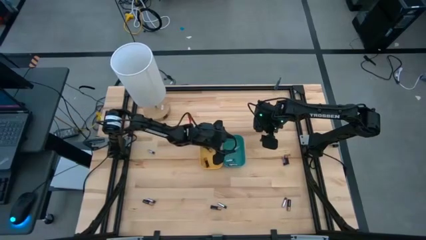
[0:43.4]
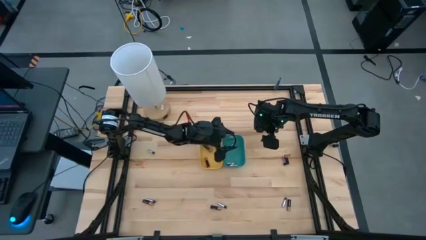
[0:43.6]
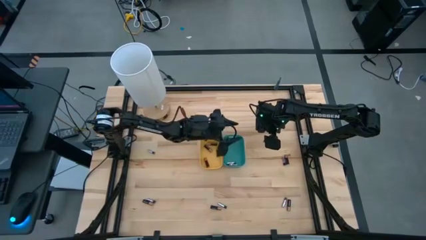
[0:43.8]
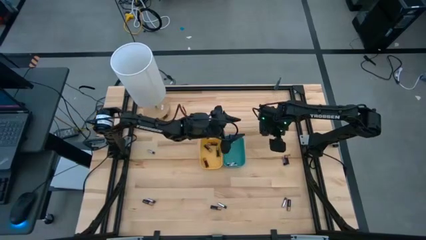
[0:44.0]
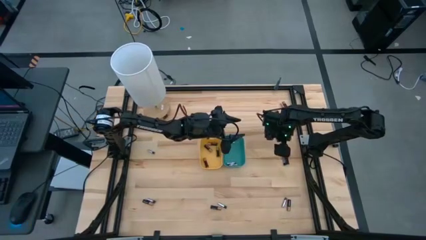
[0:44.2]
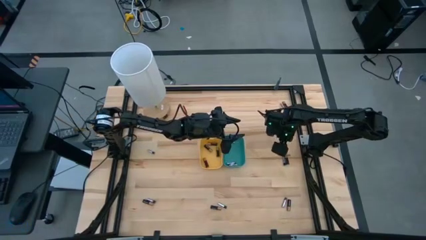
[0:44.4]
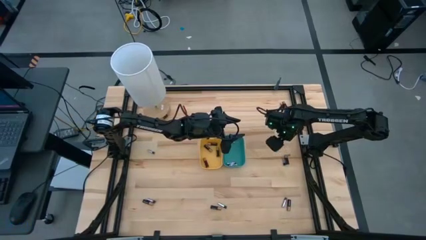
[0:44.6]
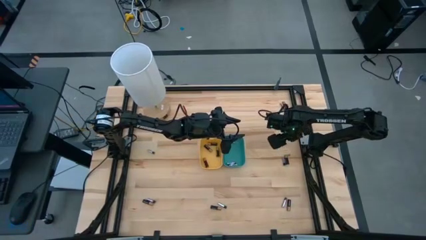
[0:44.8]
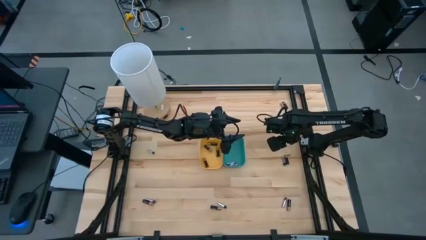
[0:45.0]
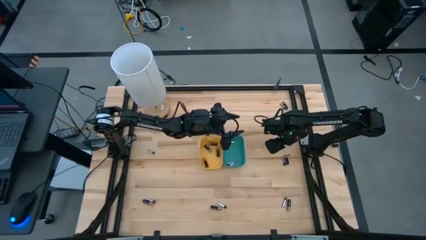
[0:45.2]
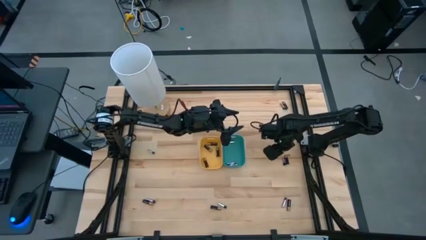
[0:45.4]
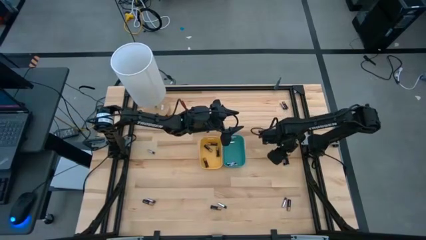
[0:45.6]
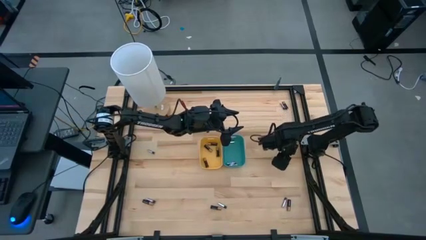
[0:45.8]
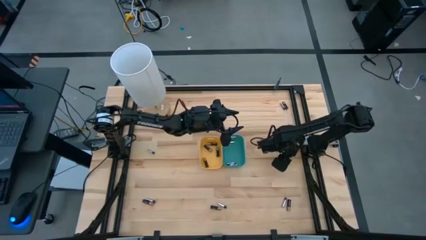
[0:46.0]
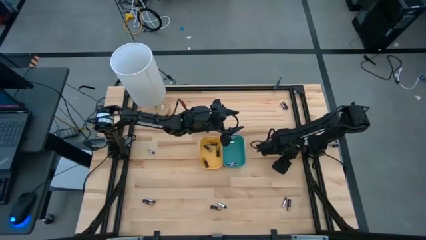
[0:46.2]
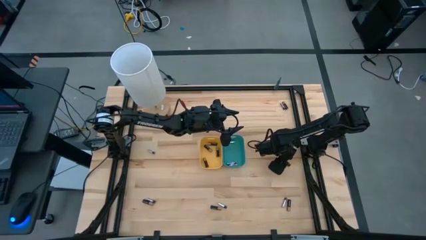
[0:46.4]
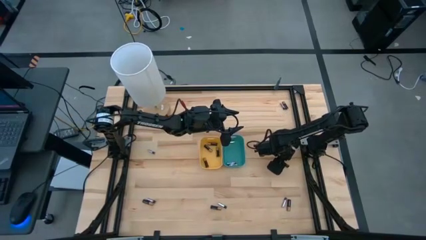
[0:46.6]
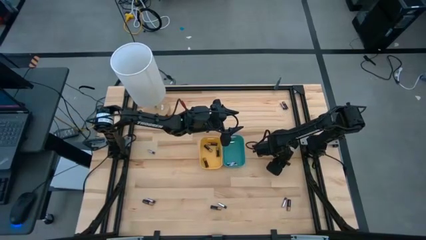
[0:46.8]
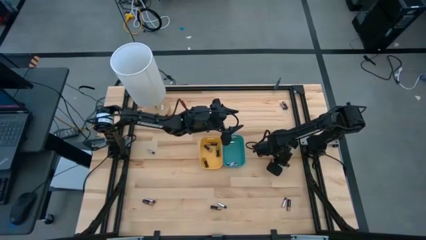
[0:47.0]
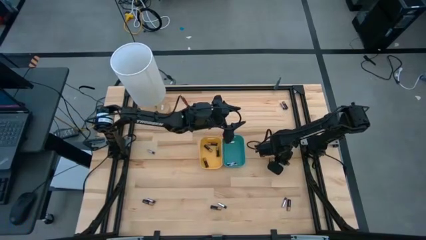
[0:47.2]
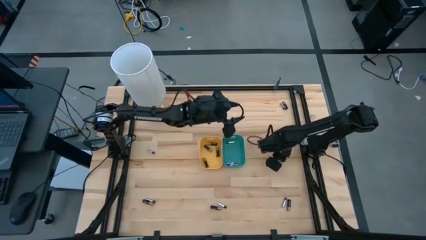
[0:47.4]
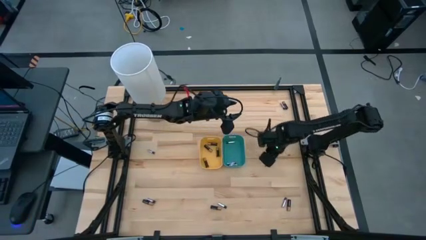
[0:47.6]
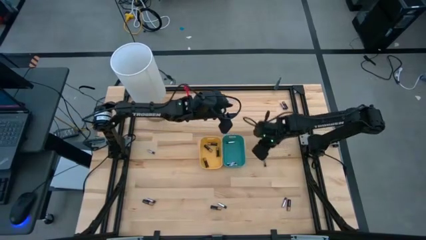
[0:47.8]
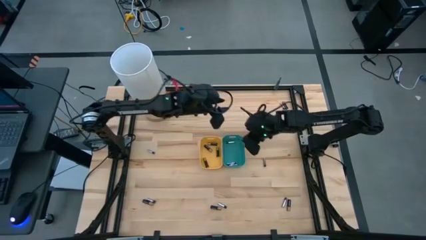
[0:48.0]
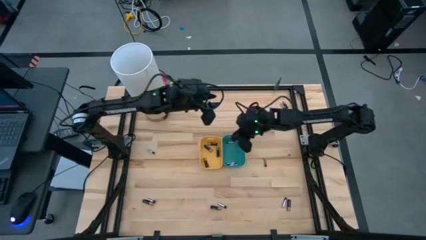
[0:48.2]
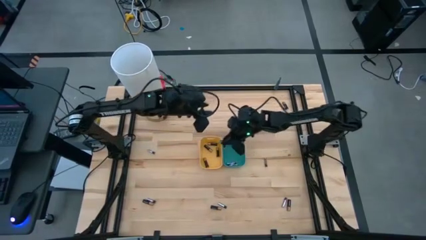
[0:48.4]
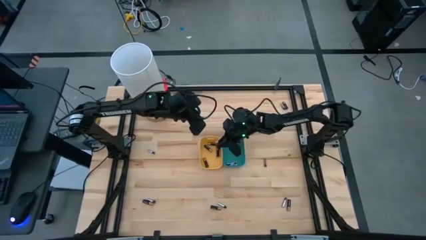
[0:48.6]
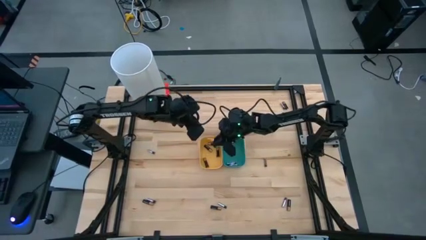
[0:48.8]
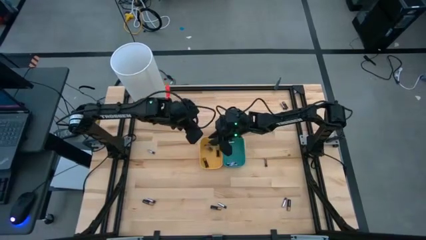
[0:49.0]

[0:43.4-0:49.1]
Task: Sort batteries
Put the black battery into the yellow bin

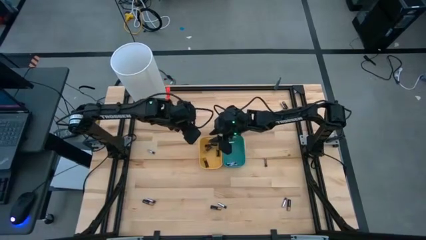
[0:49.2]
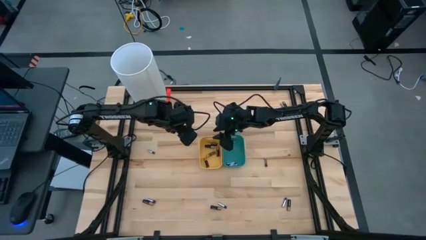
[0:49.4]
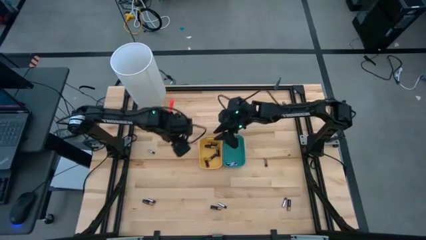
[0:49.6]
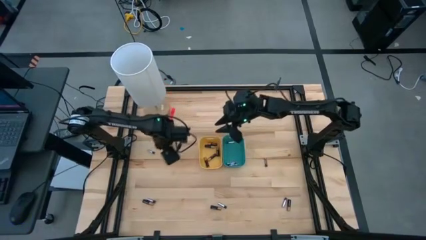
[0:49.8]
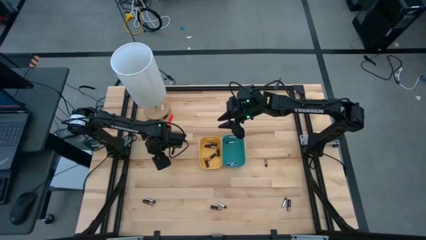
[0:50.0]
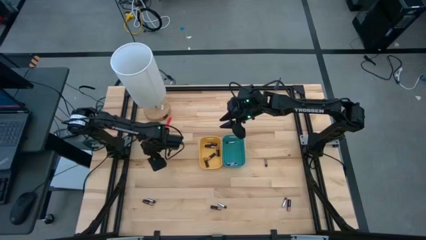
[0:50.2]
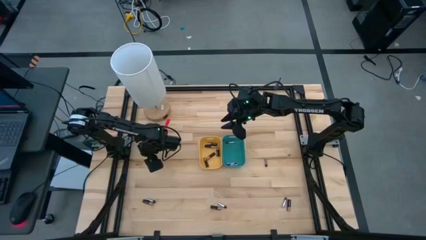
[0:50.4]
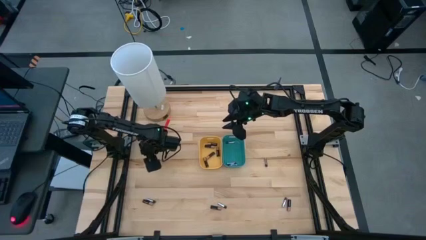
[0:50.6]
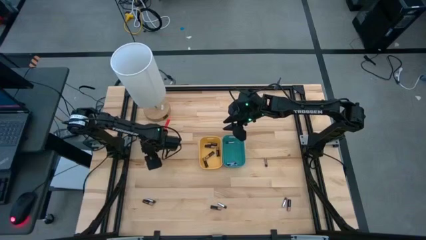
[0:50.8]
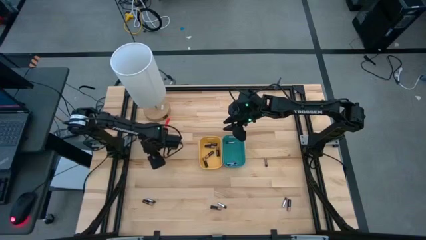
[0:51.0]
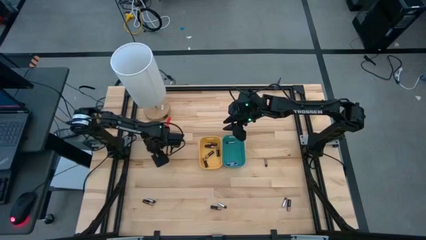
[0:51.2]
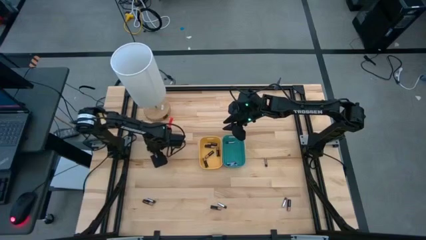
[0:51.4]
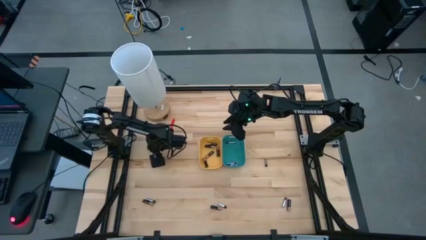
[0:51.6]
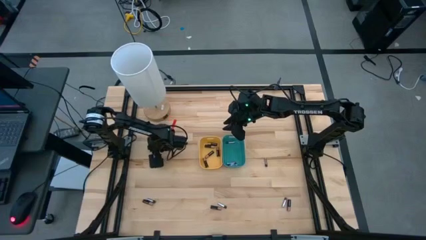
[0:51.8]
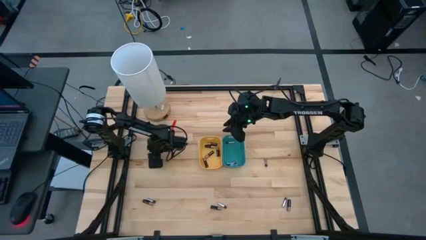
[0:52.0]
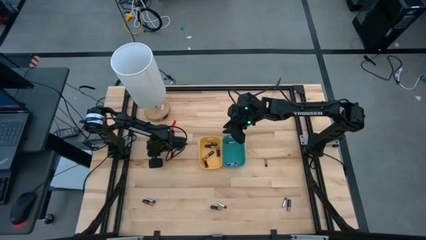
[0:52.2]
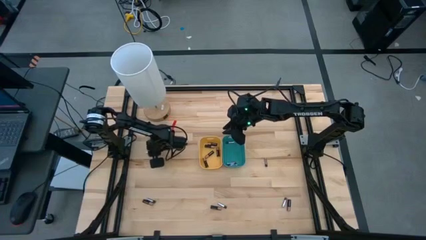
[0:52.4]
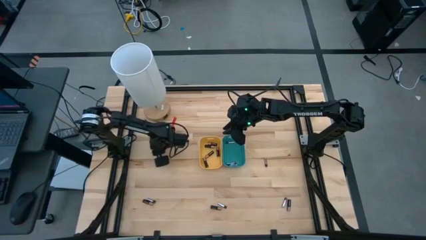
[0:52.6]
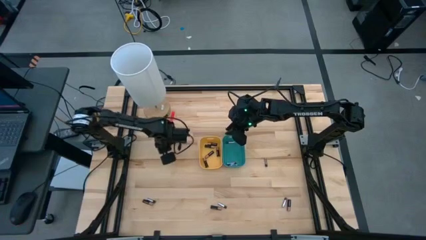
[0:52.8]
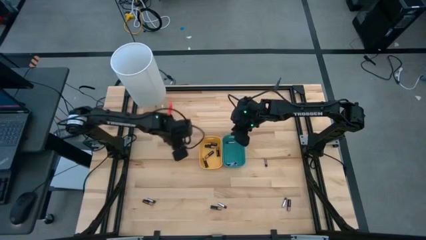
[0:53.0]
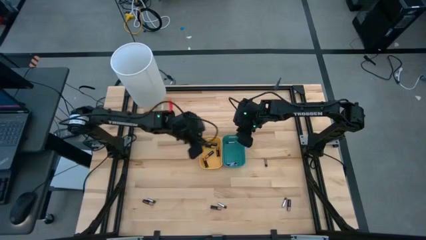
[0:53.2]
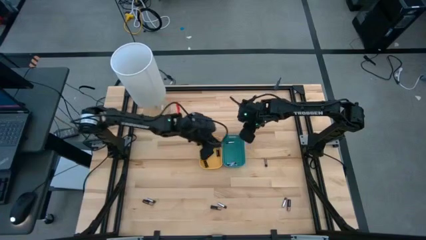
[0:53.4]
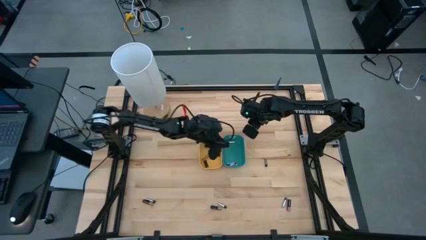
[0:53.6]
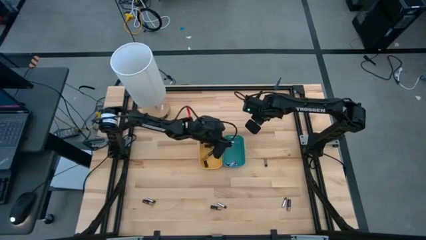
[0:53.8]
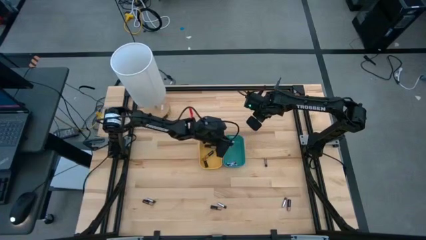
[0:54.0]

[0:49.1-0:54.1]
Put the silver battery into the blue bin

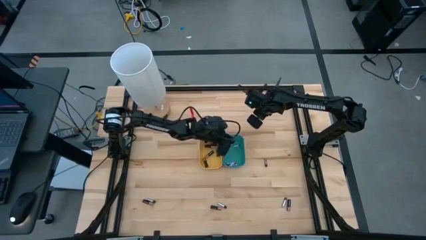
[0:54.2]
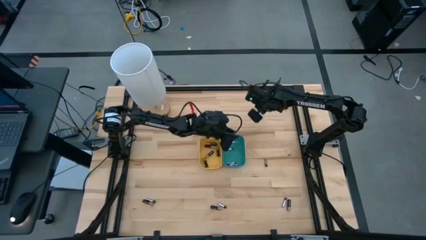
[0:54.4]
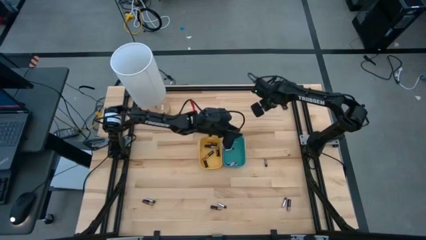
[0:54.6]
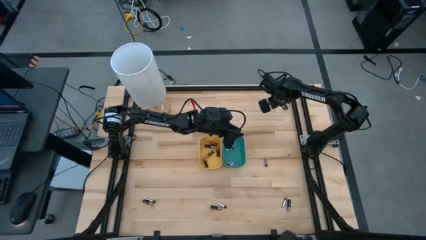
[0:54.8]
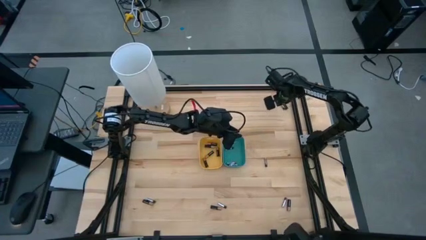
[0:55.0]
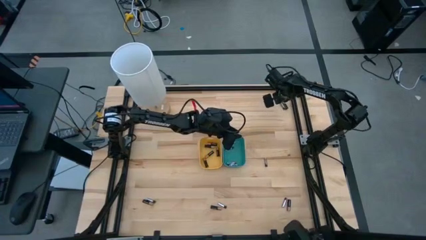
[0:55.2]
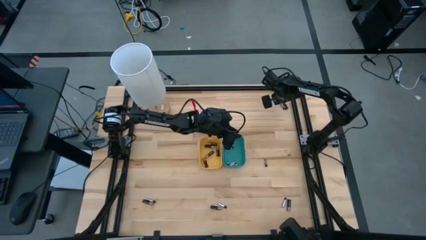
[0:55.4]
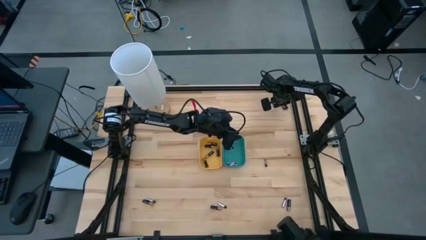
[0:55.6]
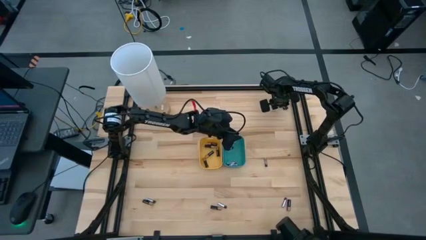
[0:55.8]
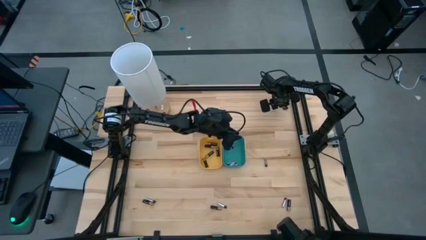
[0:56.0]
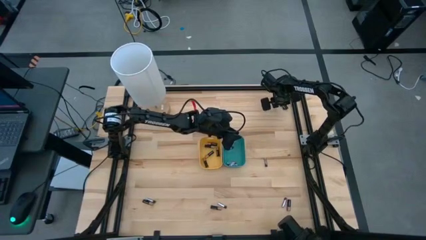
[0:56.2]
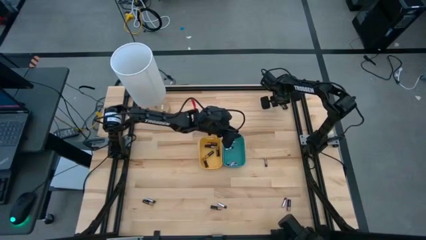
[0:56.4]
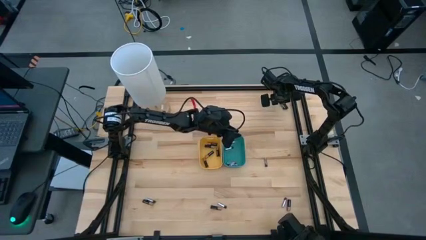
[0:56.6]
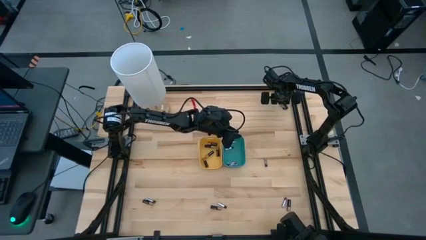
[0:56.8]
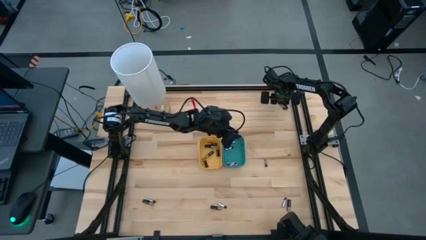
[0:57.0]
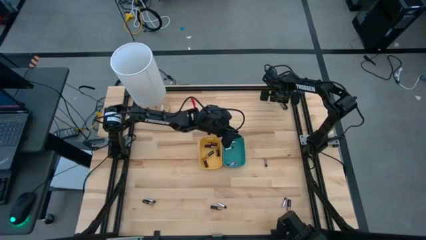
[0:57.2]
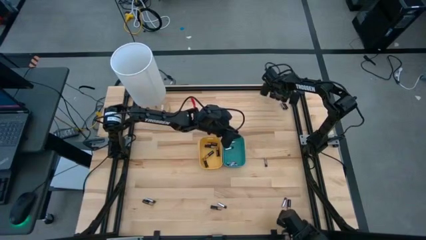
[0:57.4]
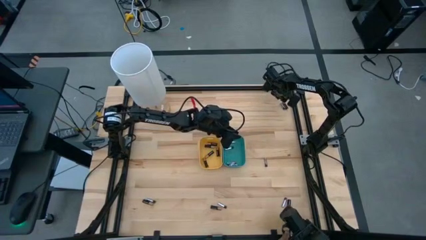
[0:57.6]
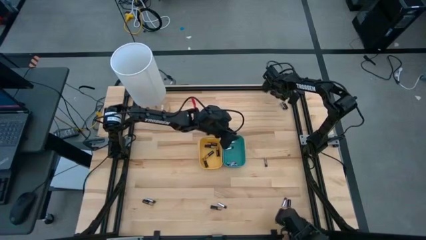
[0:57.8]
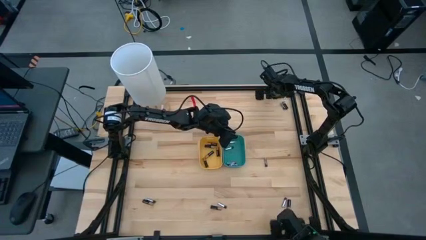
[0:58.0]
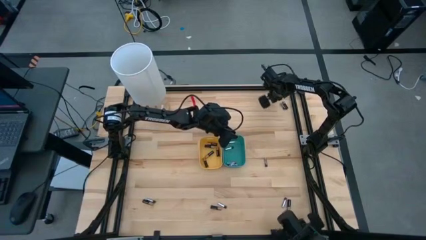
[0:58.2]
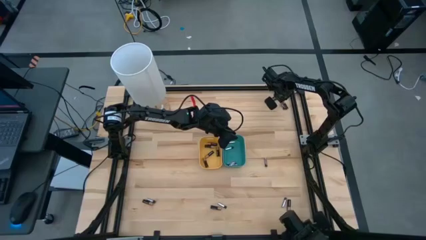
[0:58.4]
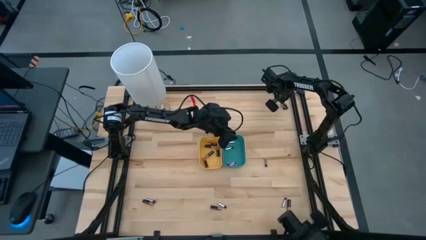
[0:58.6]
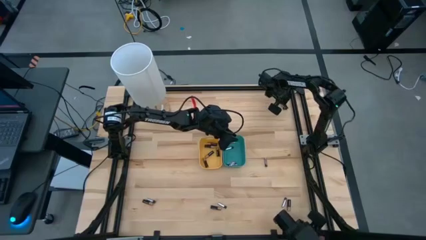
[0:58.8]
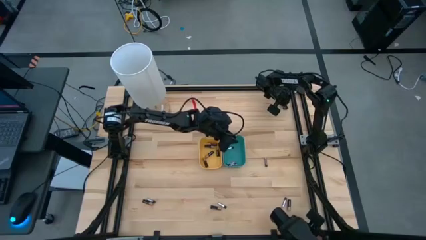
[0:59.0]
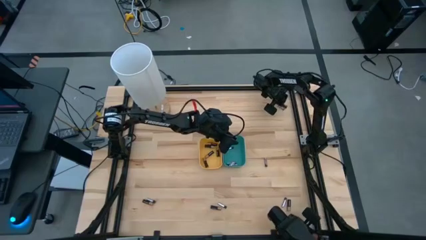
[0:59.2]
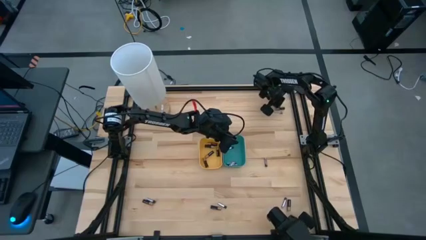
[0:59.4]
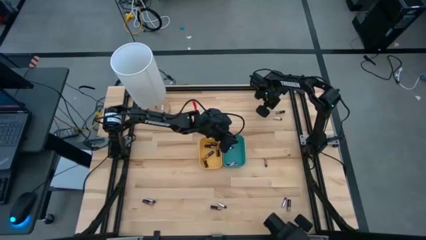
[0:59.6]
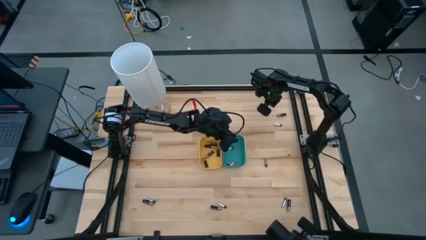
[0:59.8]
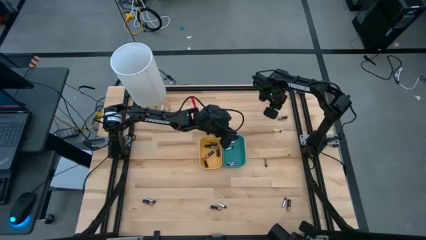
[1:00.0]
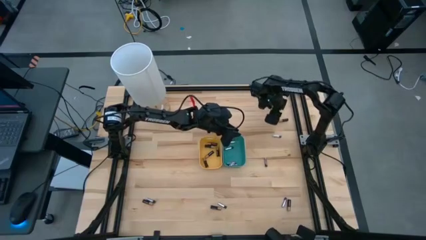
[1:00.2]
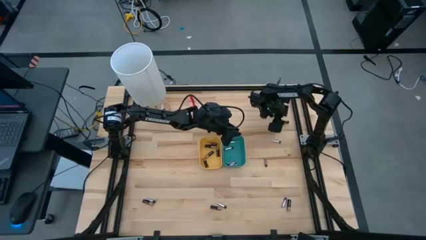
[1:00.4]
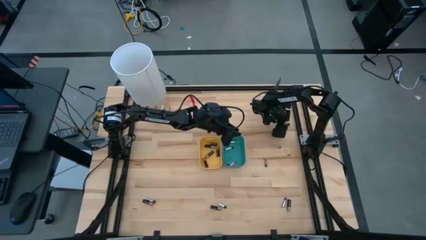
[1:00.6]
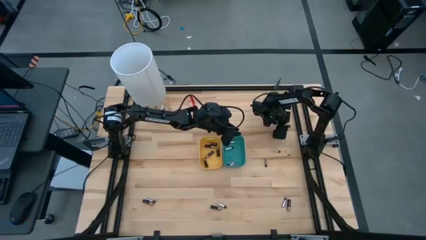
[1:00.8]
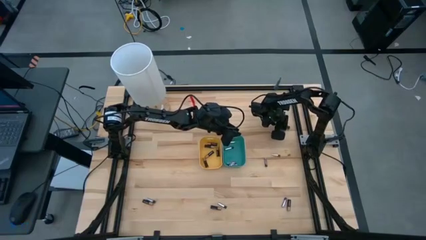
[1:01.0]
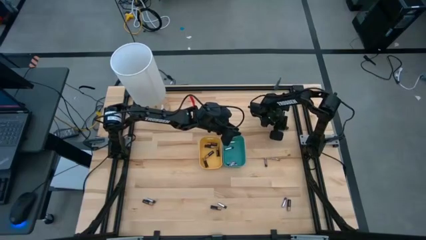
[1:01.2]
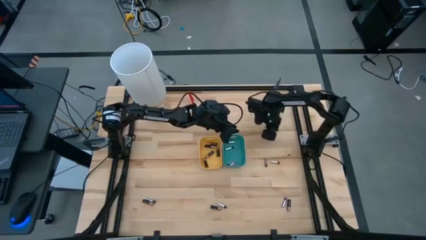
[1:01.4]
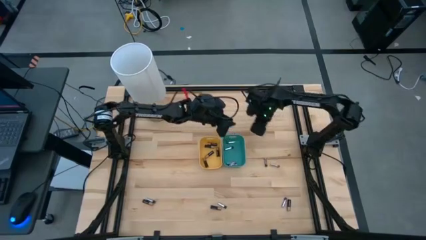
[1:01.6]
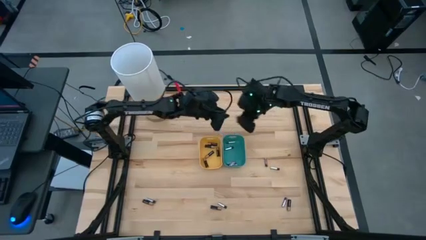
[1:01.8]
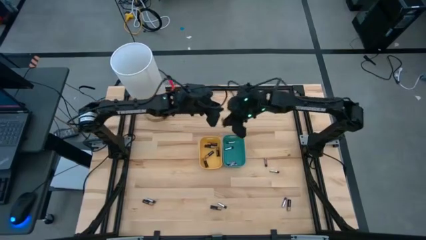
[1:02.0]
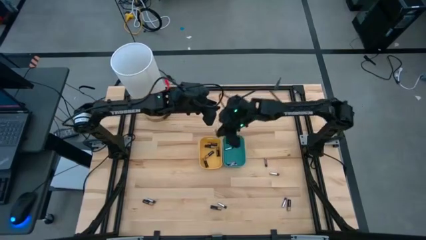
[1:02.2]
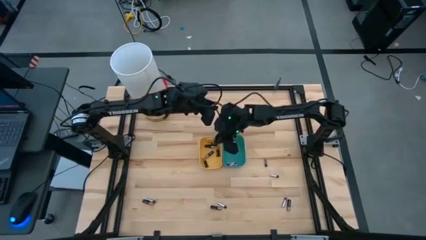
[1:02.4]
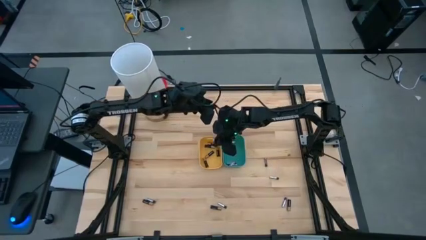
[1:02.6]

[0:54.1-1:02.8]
Put the black battery into the yellow bin
